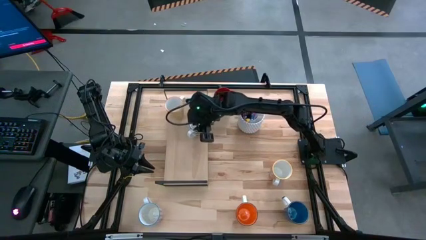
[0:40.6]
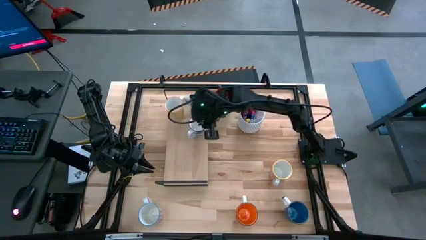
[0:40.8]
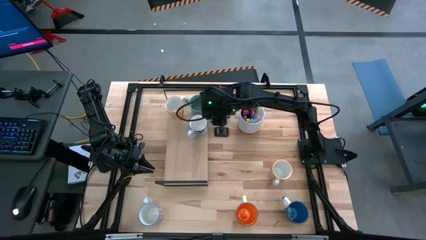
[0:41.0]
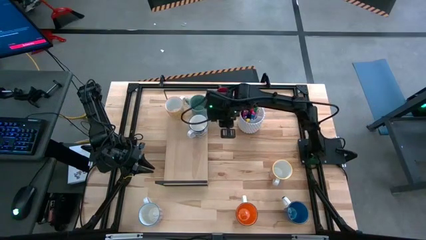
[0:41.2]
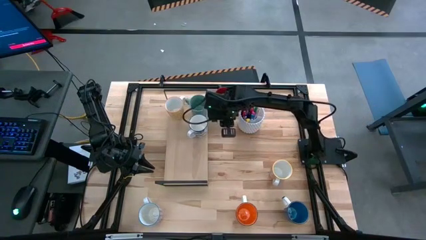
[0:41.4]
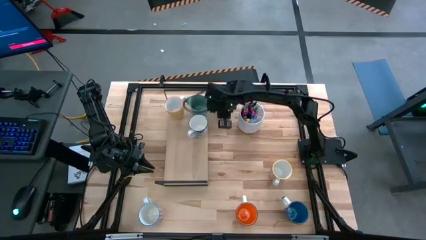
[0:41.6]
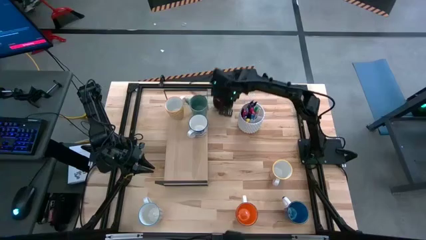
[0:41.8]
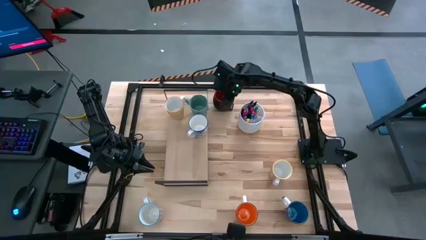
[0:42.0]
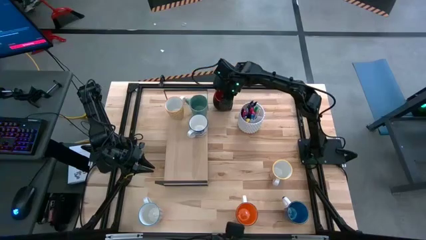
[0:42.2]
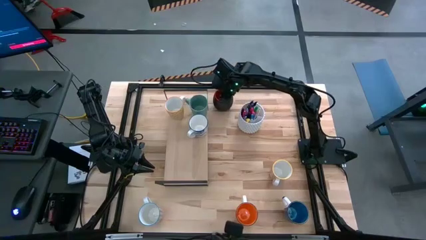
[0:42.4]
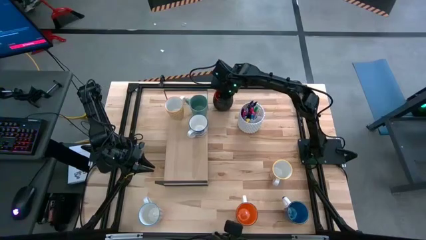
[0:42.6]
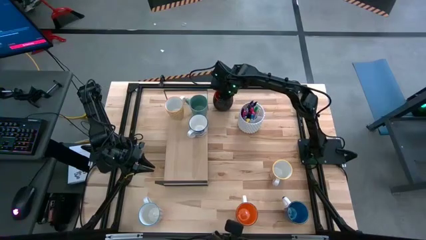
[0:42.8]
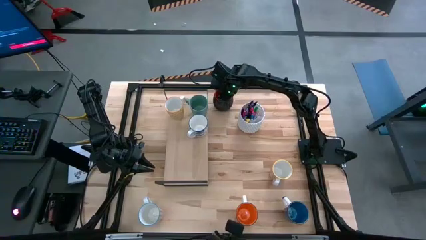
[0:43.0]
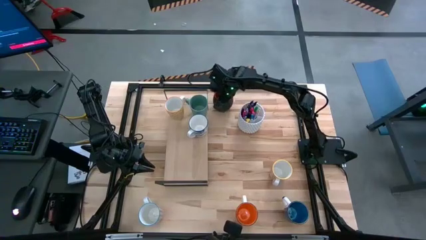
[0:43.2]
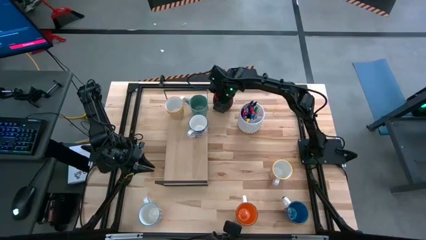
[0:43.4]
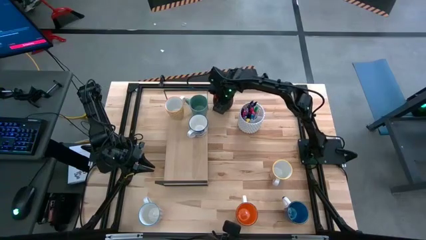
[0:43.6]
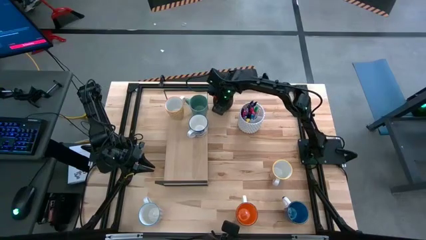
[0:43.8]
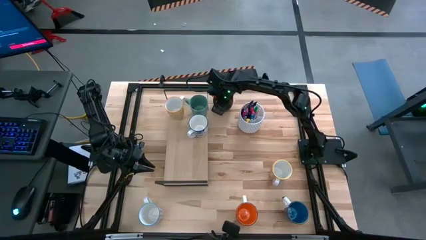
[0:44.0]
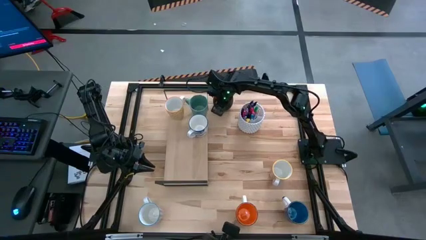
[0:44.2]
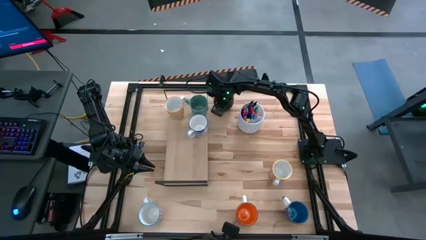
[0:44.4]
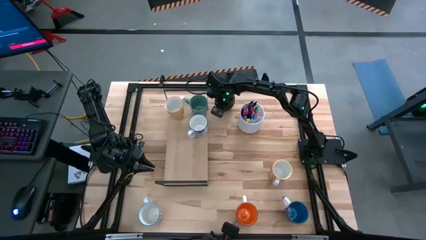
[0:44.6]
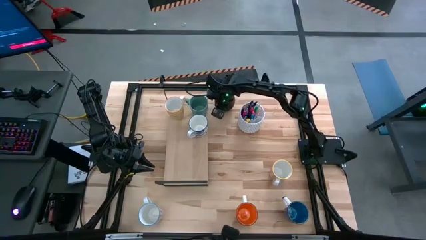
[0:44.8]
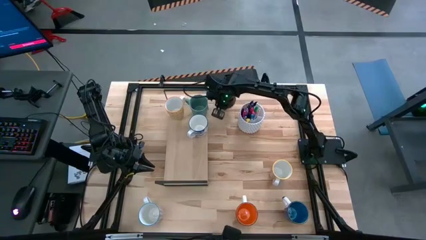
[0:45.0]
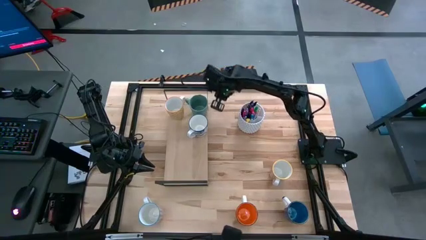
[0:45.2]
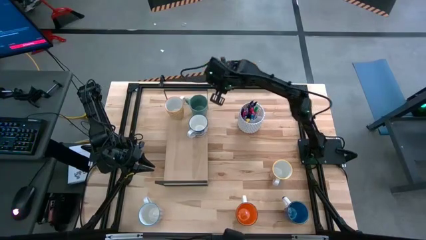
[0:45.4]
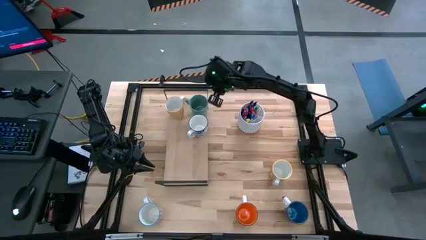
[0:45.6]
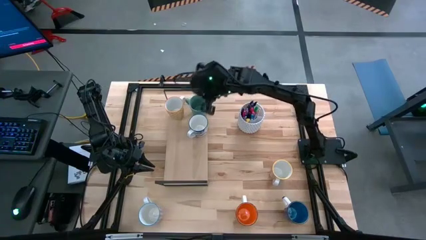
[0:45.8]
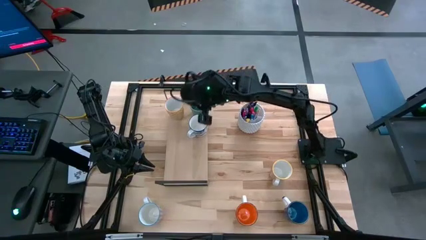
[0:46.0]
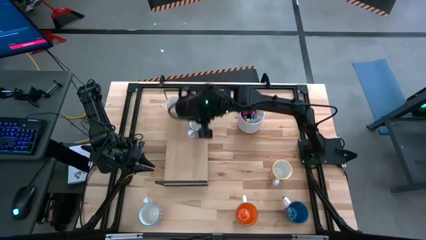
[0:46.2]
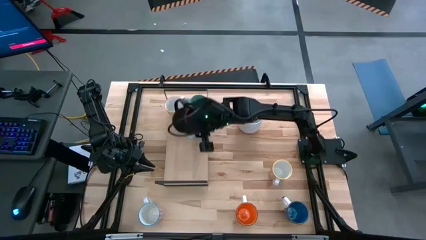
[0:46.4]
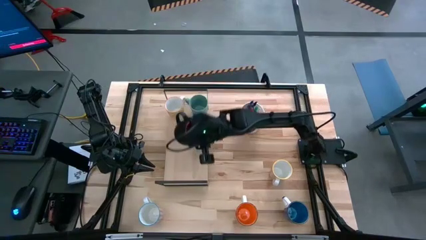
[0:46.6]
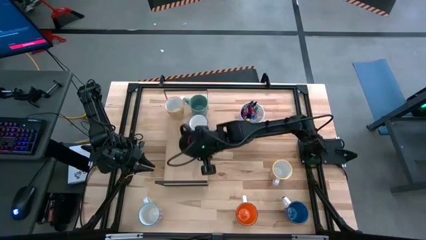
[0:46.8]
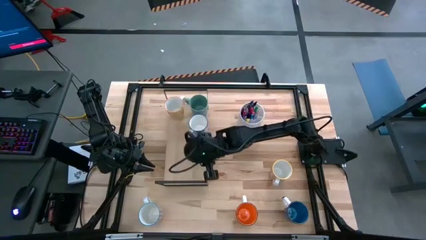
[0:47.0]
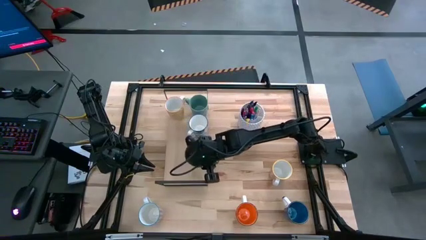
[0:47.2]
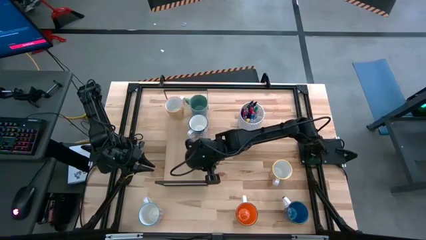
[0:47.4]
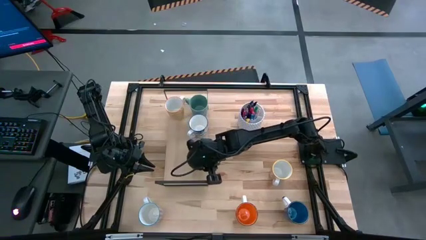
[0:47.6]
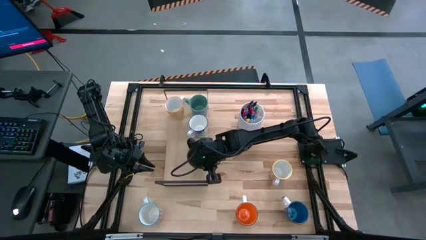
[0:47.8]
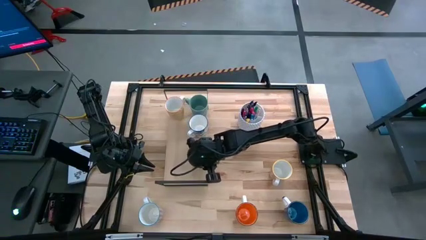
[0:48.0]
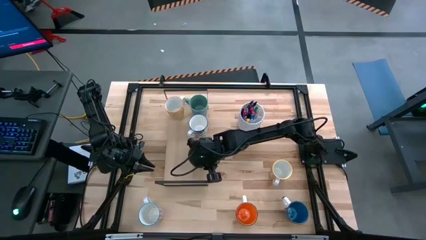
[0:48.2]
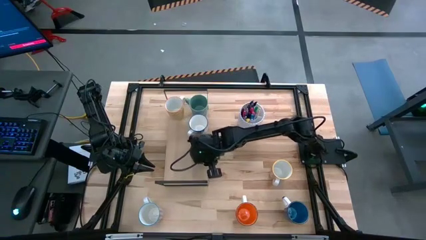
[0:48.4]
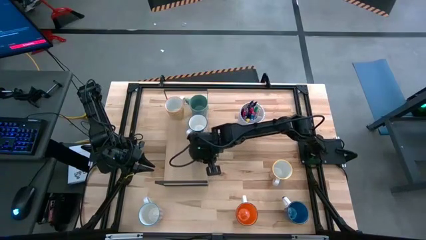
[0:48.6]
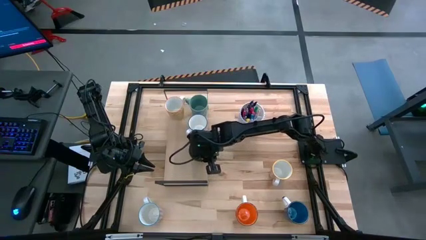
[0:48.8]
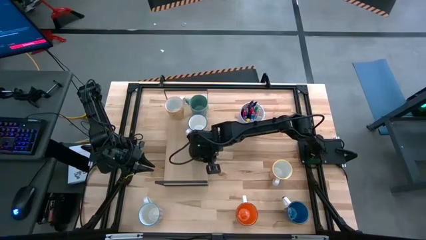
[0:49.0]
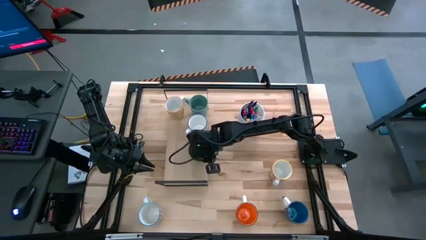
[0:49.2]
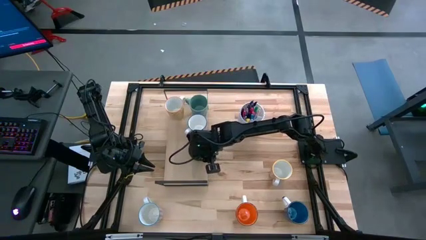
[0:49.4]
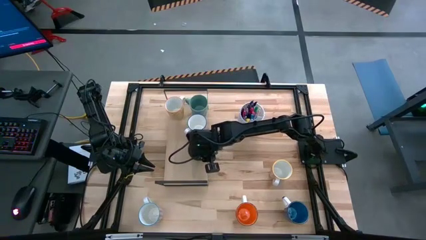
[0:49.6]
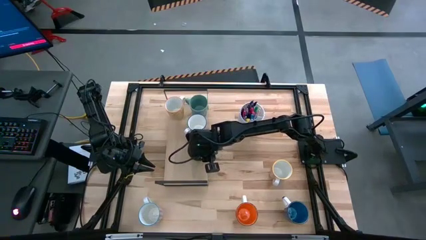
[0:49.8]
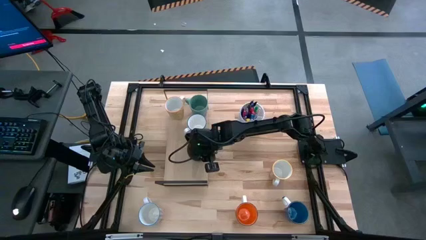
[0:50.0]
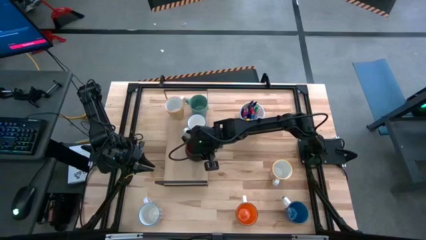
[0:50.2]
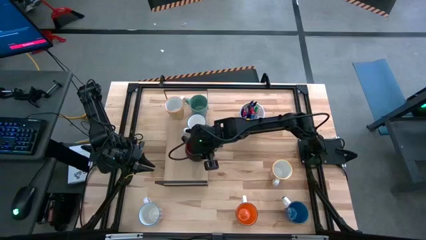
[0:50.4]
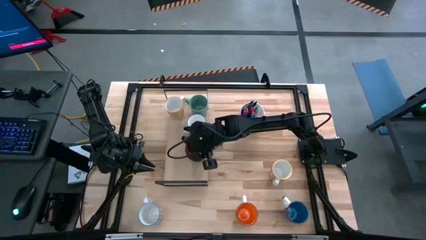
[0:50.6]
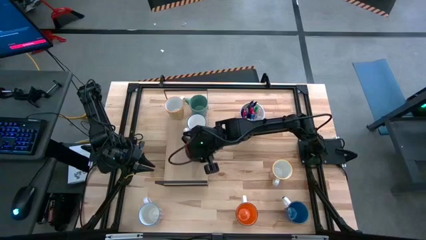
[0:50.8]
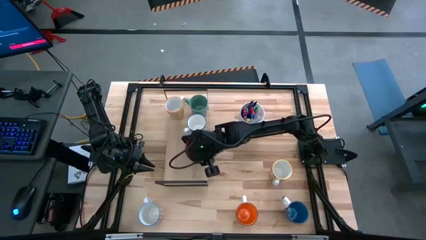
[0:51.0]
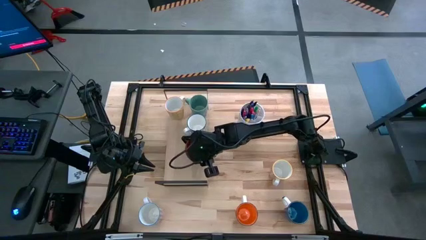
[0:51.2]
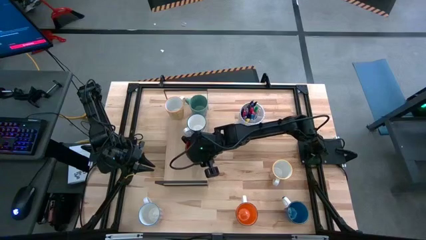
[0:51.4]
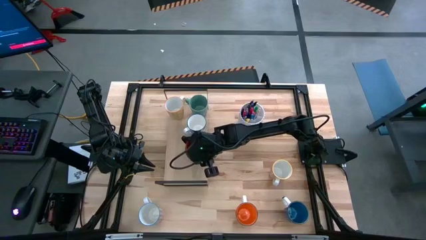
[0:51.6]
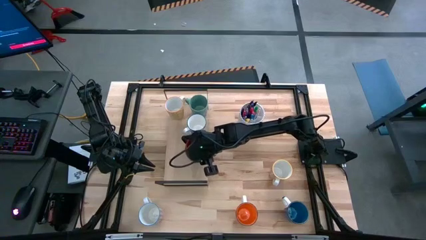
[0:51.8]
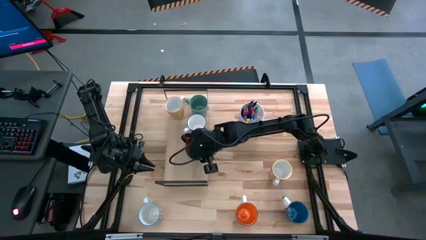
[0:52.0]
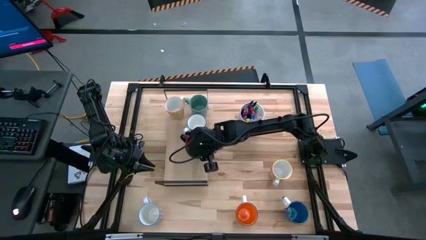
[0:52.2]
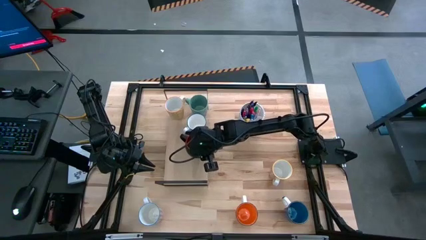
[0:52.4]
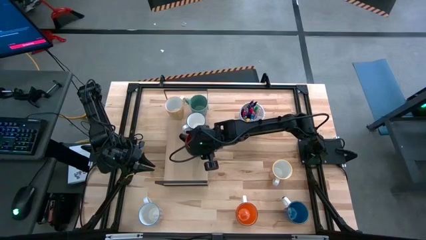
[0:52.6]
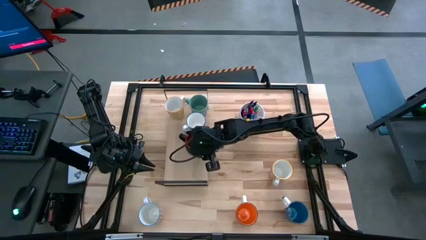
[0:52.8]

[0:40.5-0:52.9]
Task: Place coffee mugs
Put the black mug on the shelf
